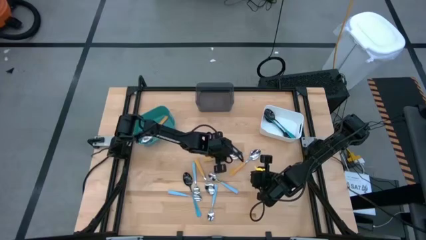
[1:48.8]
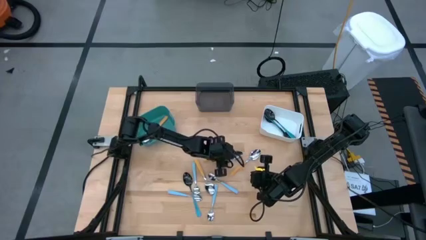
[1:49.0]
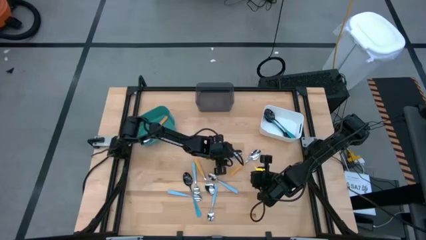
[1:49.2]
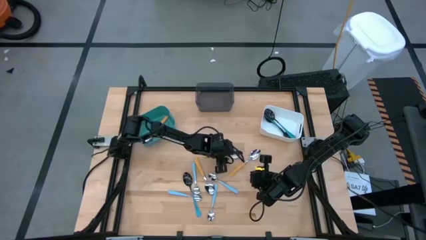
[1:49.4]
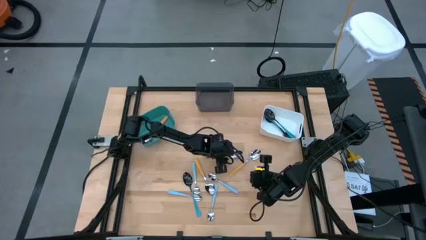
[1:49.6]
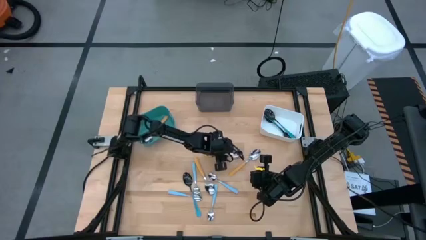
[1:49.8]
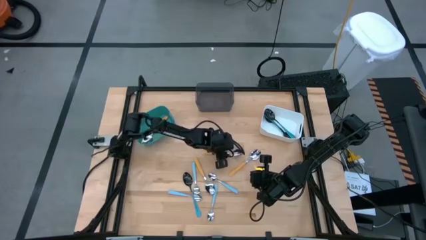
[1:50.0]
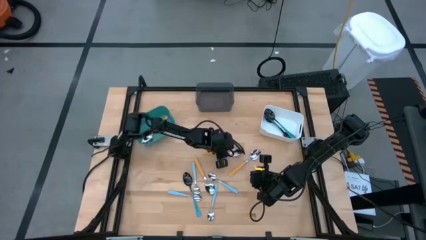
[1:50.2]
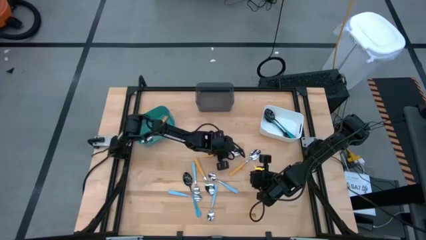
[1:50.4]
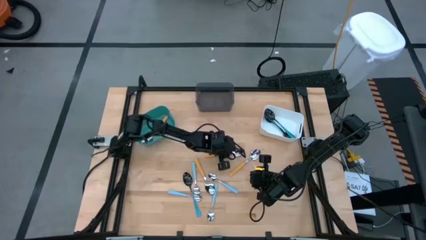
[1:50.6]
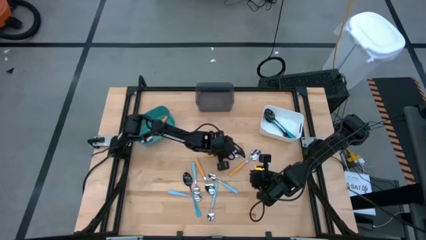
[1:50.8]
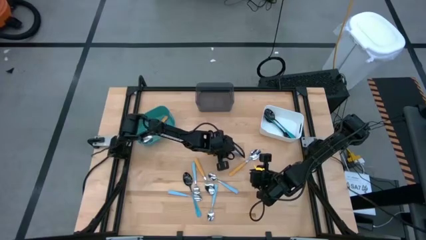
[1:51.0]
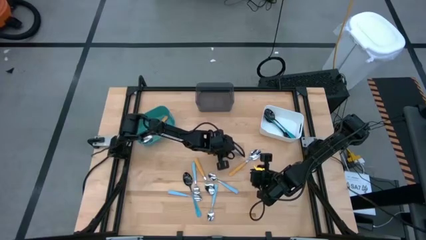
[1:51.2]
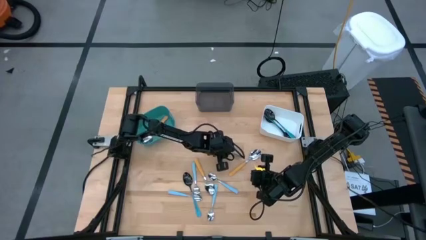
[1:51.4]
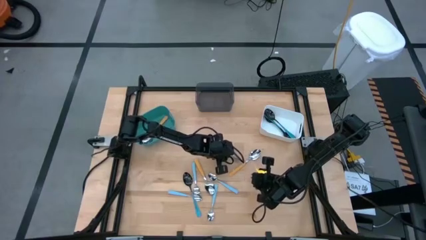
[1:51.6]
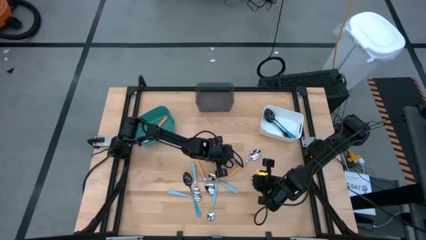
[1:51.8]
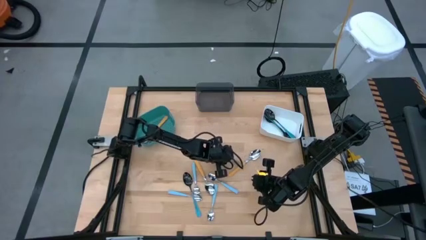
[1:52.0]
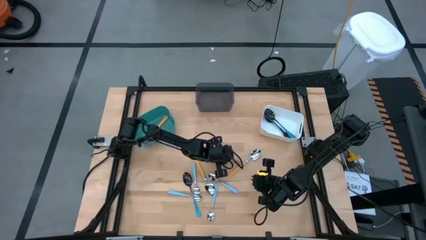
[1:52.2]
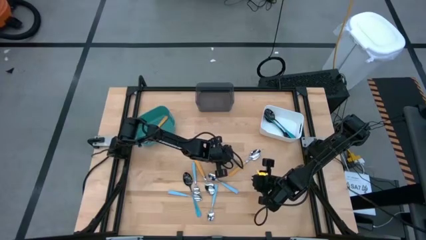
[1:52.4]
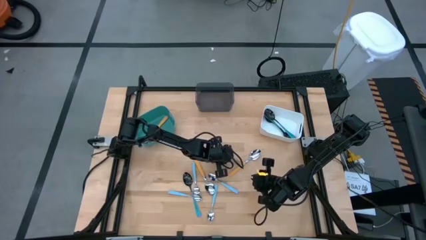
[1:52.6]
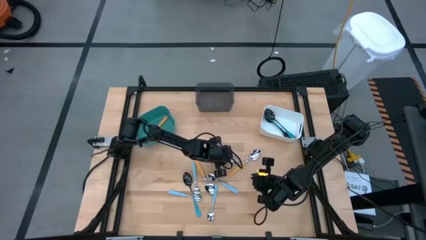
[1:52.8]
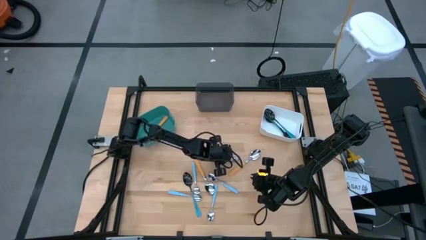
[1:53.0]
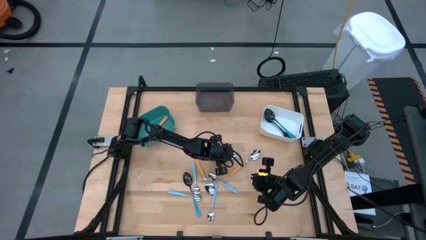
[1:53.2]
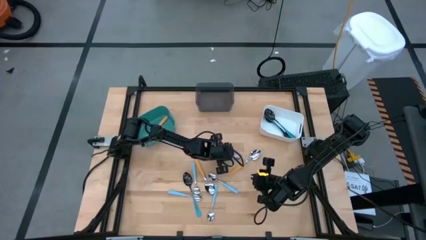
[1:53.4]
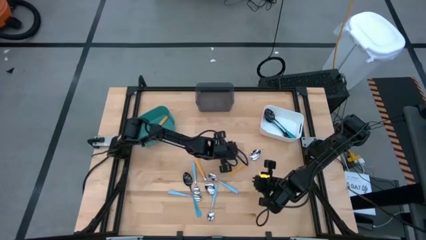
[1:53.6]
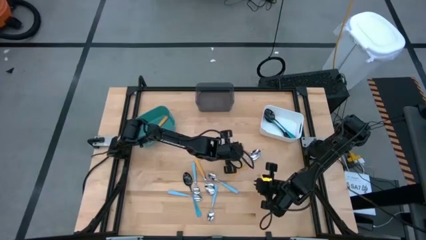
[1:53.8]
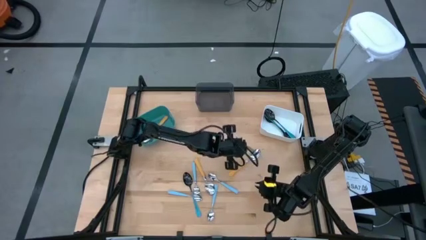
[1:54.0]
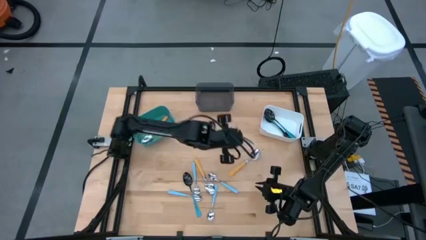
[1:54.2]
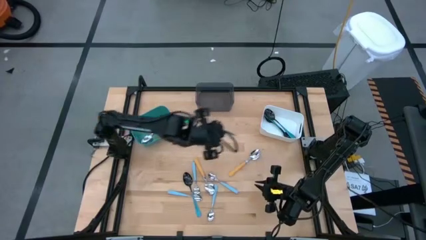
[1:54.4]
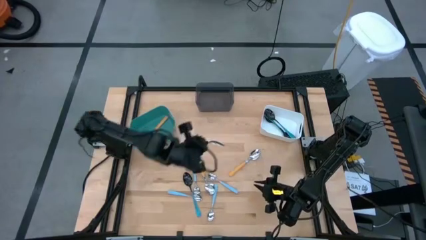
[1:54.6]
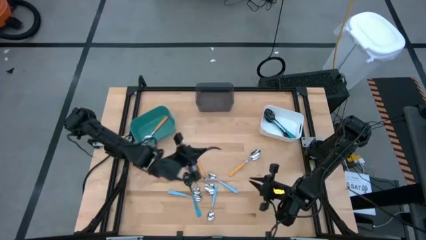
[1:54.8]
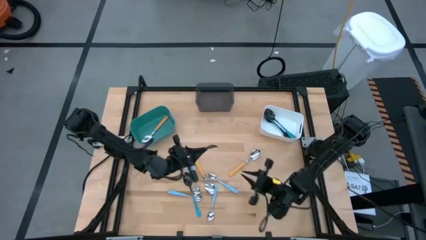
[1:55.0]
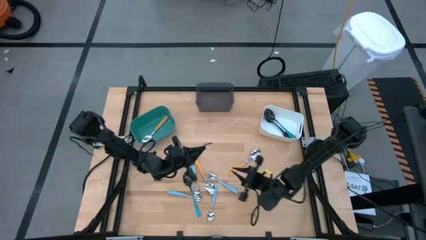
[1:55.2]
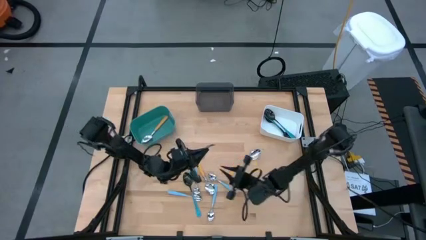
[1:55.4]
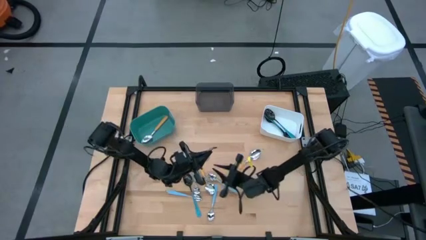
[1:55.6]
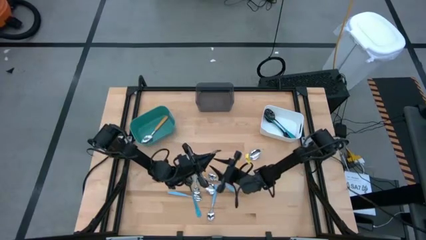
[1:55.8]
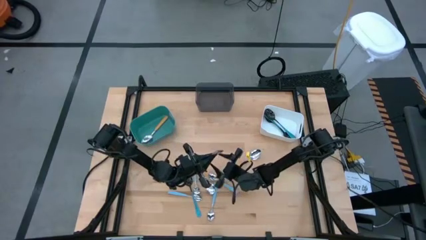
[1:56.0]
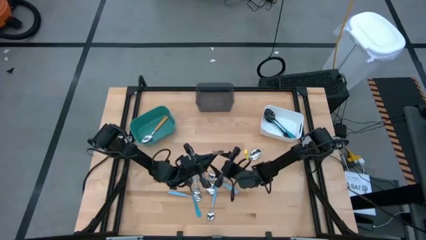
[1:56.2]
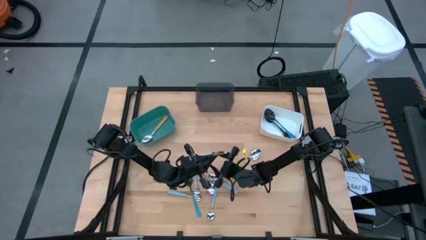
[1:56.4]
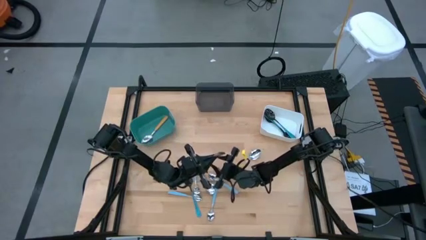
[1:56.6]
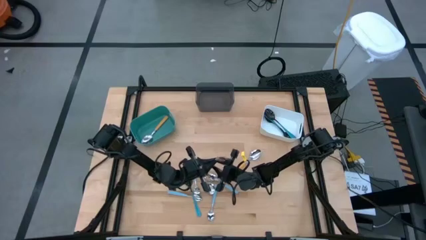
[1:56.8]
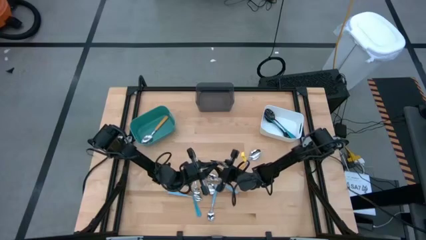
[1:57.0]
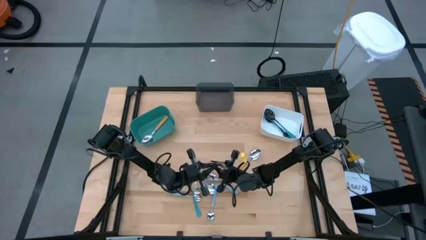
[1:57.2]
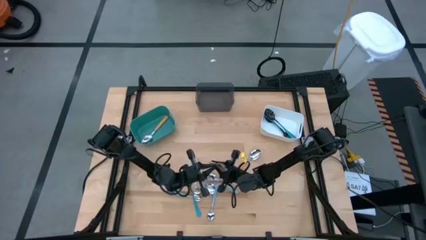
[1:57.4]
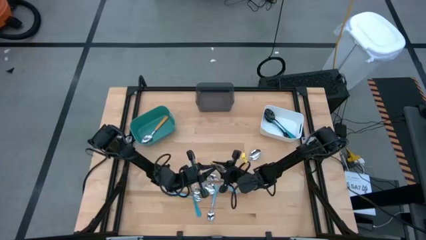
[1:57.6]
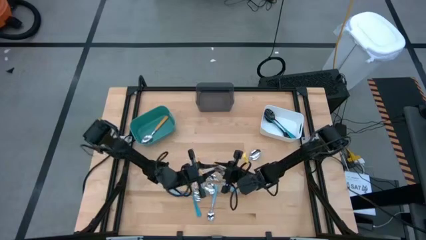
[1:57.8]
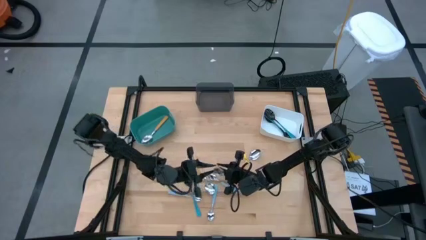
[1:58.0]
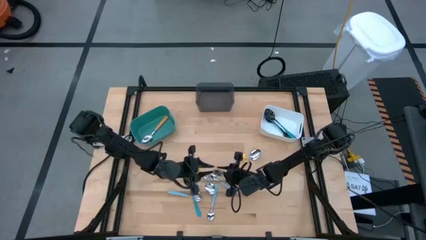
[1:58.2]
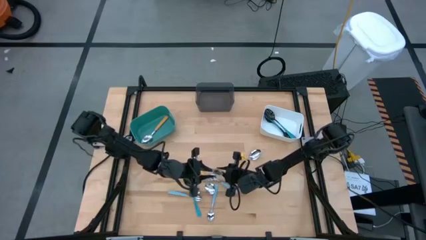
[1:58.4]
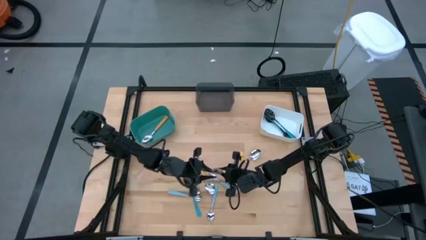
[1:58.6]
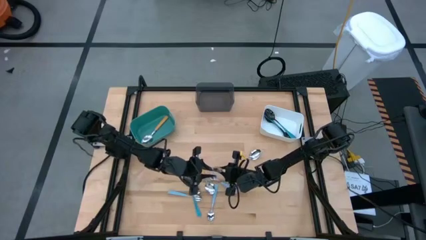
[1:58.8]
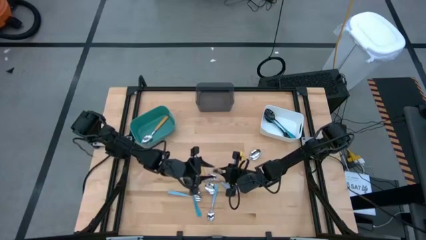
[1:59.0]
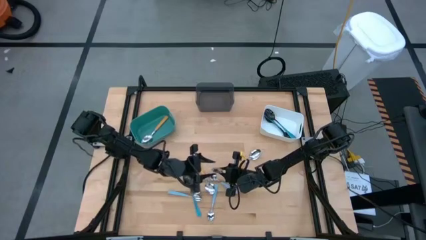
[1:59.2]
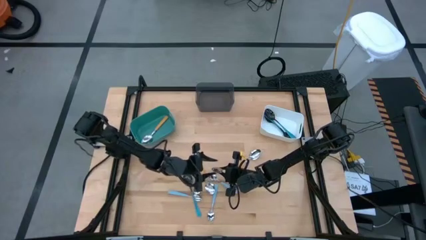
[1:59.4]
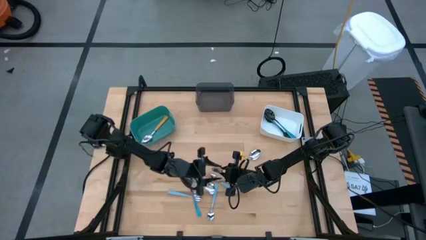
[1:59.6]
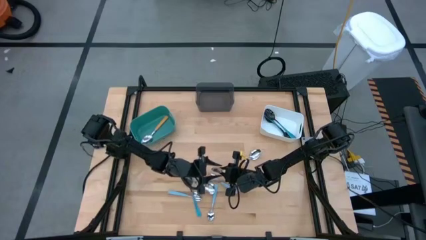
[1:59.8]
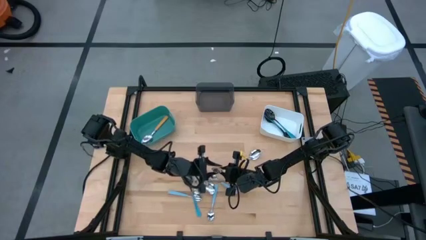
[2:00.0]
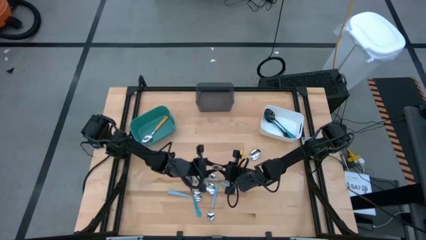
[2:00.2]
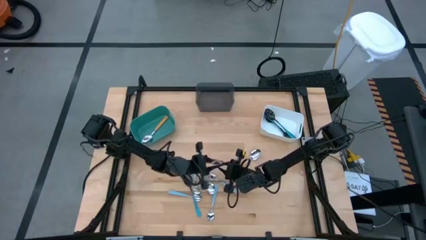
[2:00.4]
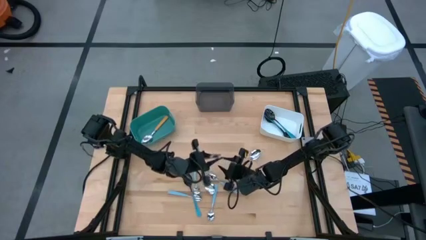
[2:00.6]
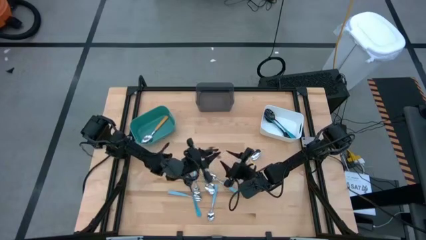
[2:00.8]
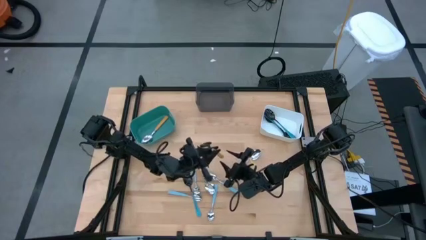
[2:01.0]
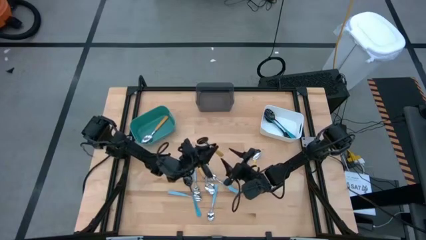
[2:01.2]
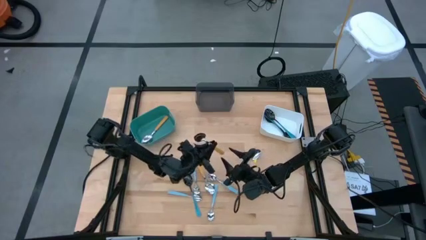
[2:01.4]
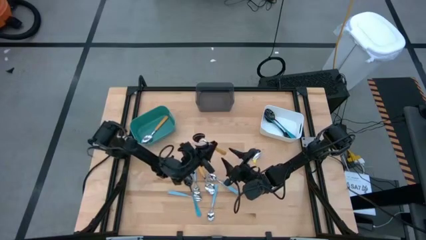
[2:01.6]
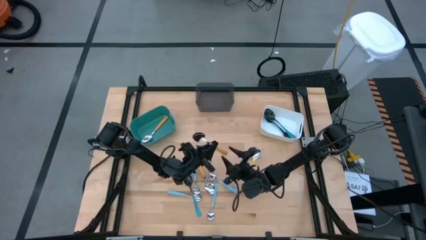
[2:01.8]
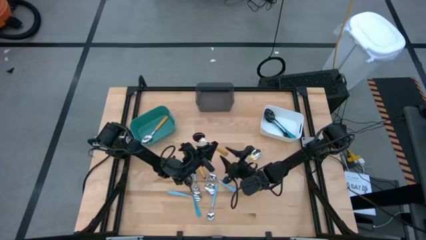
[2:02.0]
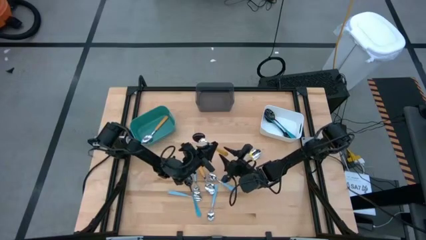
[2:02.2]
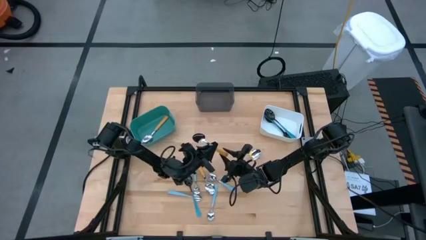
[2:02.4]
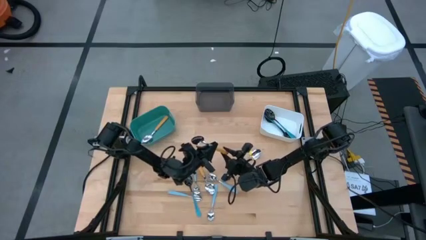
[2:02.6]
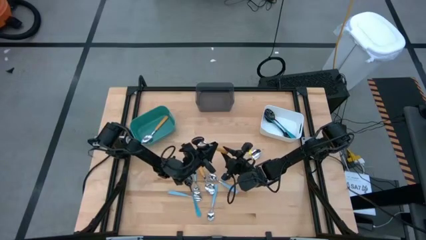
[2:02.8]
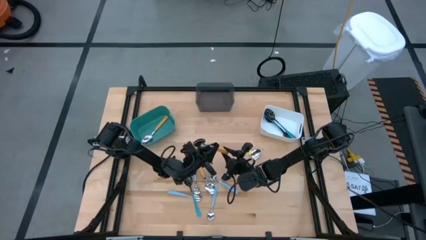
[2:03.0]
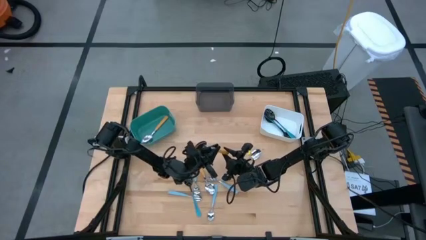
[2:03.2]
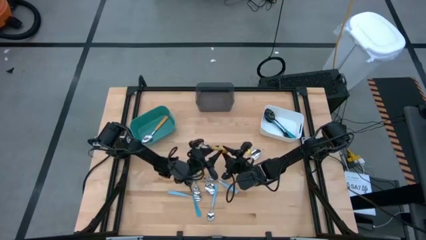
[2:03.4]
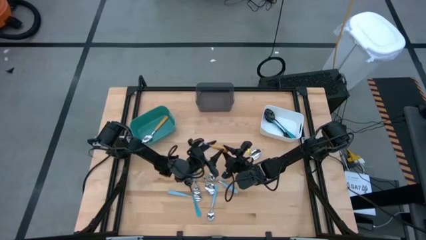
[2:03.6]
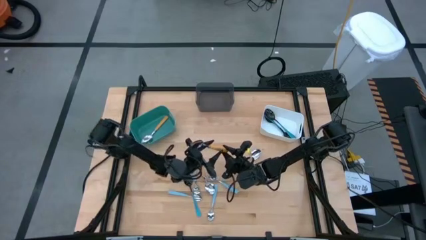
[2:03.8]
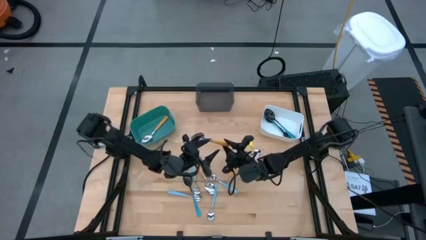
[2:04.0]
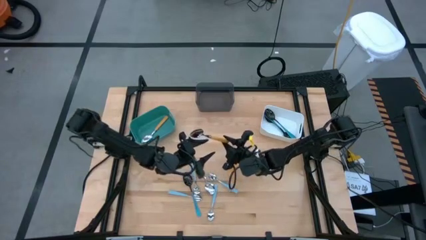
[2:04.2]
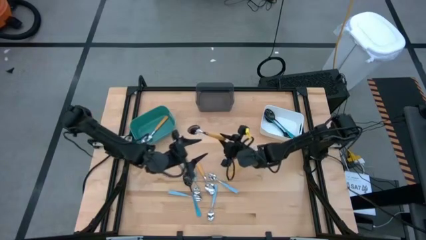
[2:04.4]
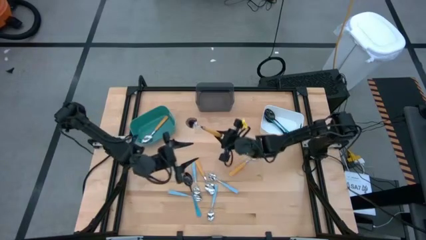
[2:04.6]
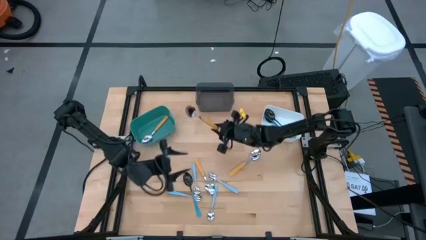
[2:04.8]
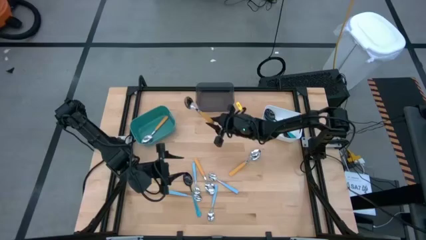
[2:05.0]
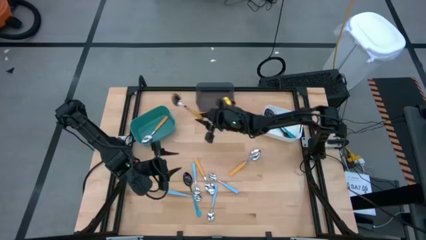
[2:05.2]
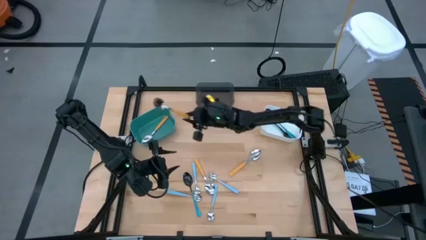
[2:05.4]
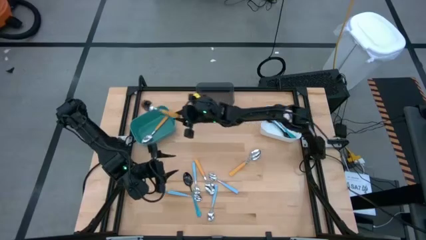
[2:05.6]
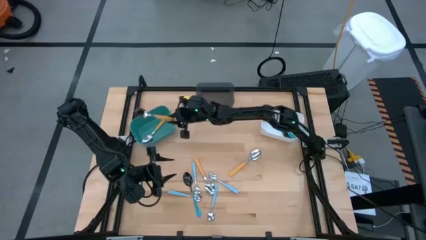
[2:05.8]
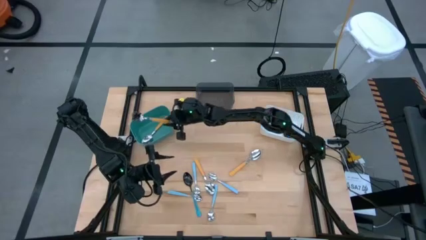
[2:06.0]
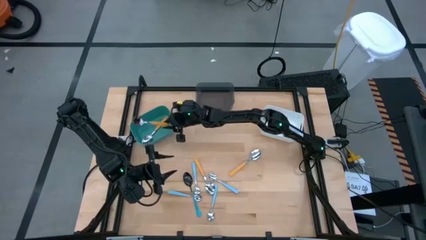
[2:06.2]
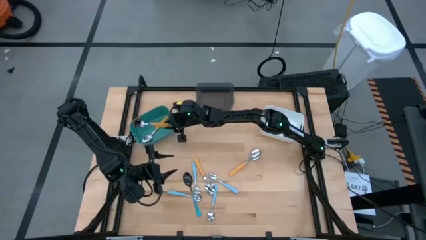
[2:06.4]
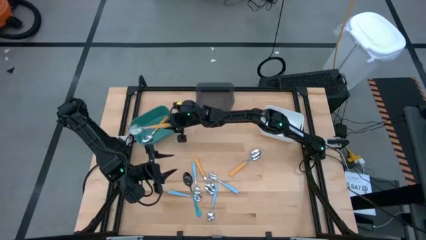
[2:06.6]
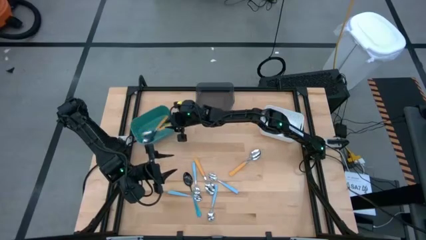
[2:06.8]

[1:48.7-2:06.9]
Task: Sort silverware by color (type)
Put the yellow spoon into the green bin
